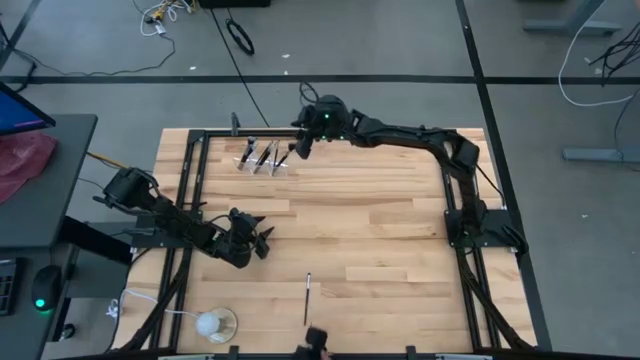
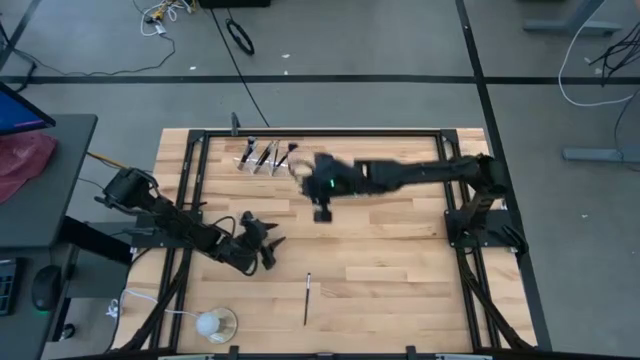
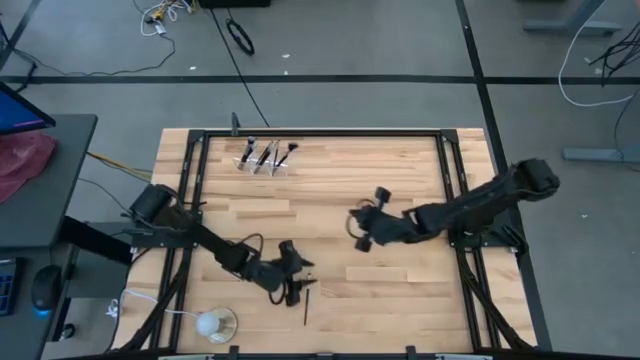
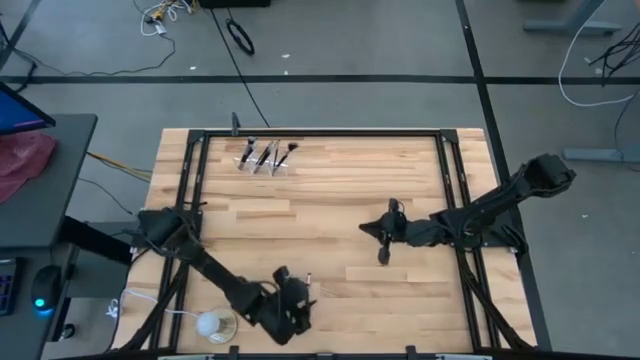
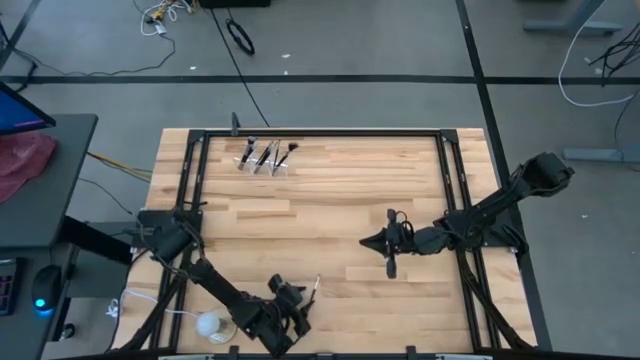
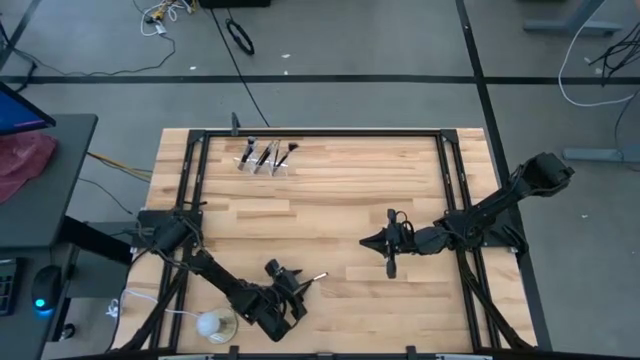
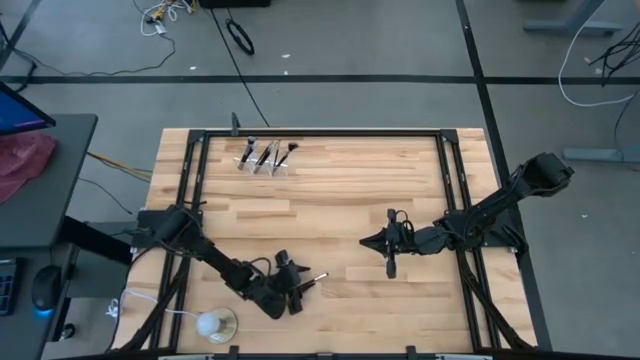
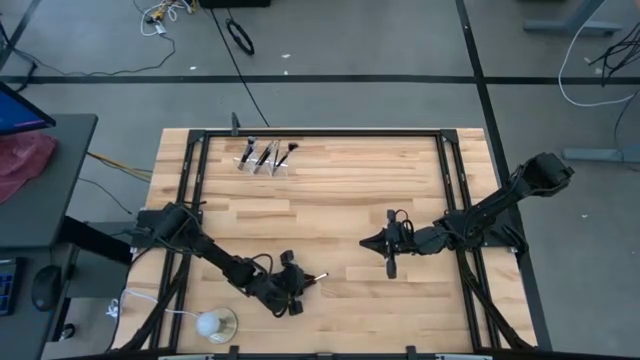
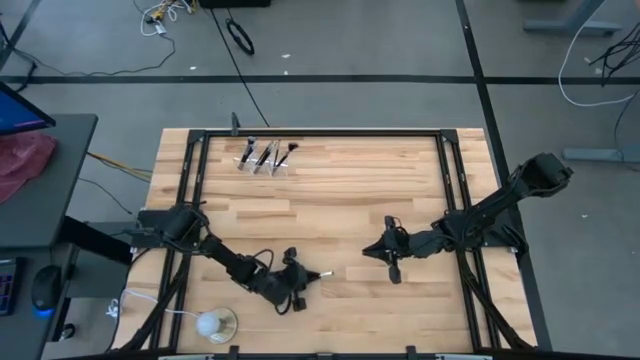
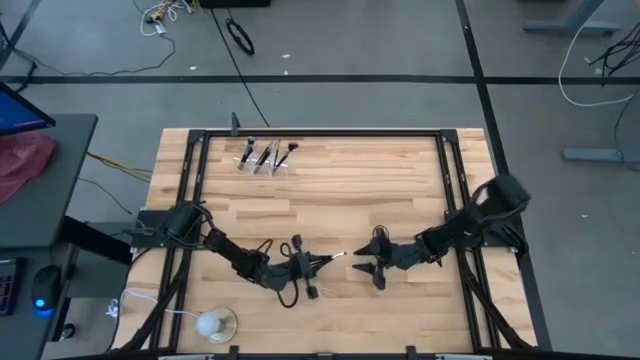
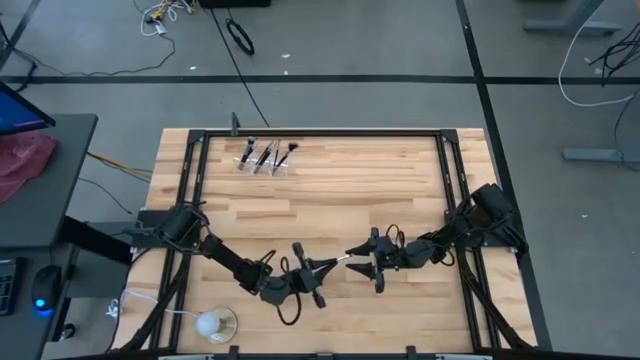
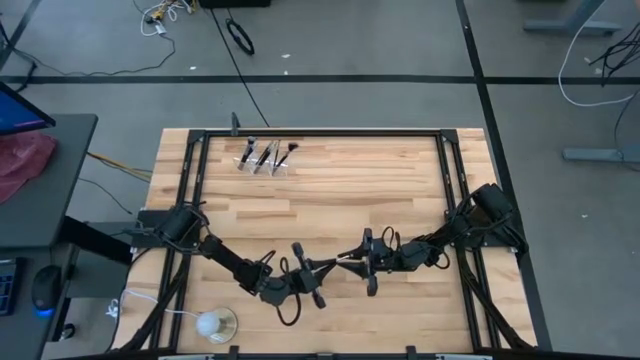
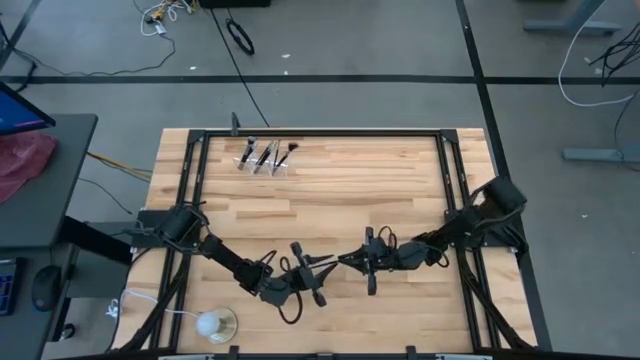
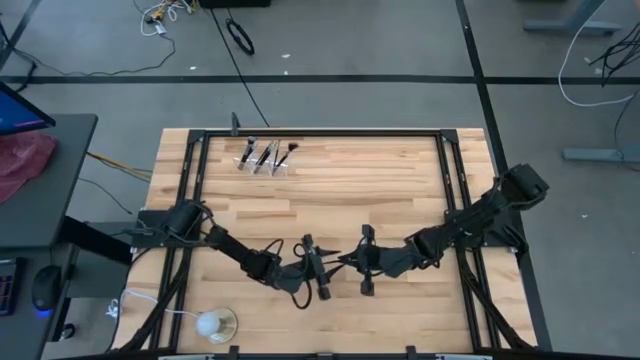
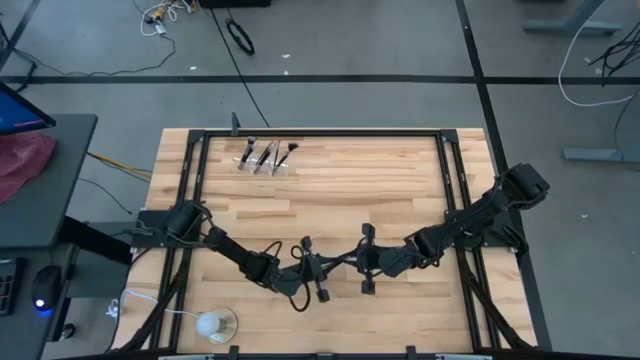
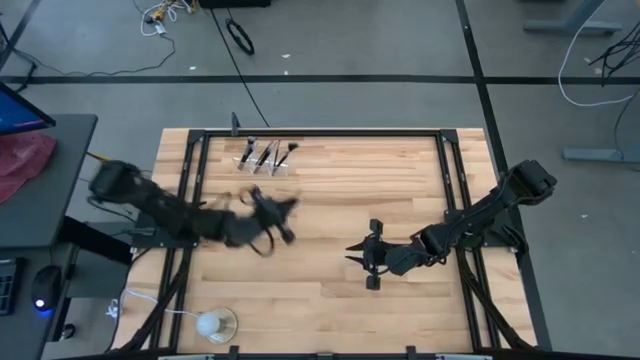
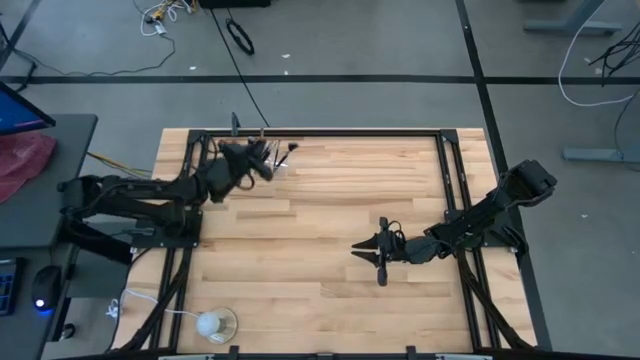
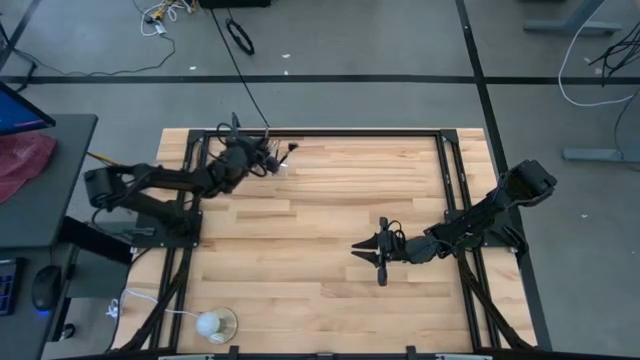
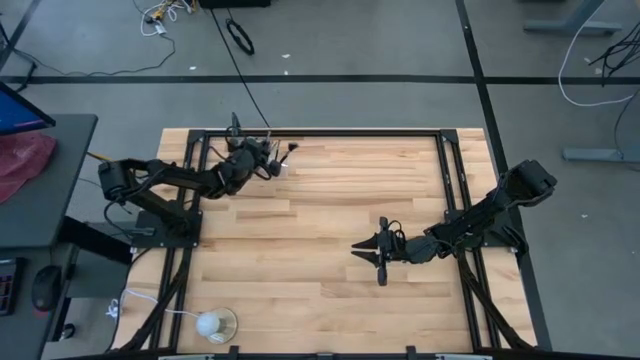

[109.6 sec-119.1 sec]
Task: Put items in baskets/containers
Put the eyeshadow brush into the middle section of the transparent organizer

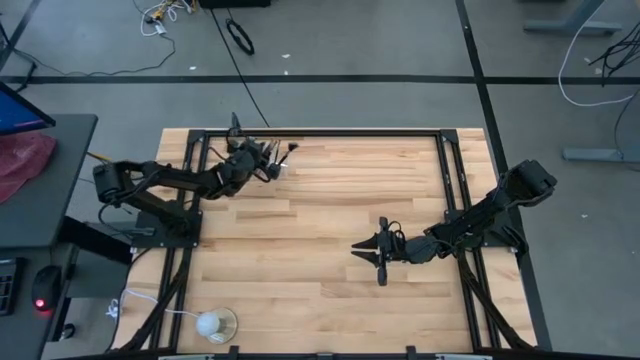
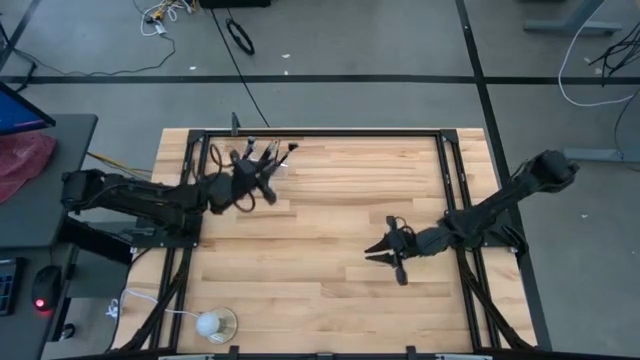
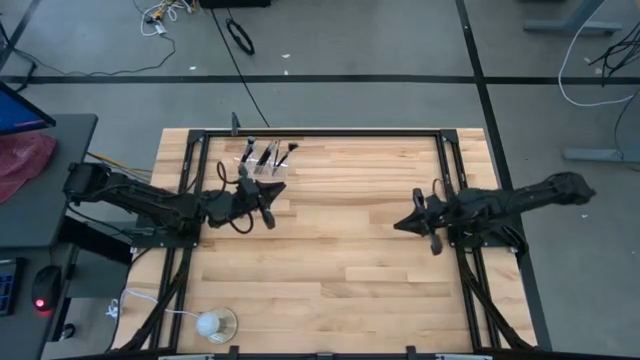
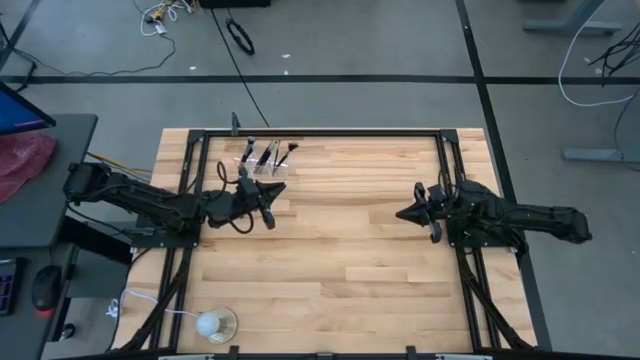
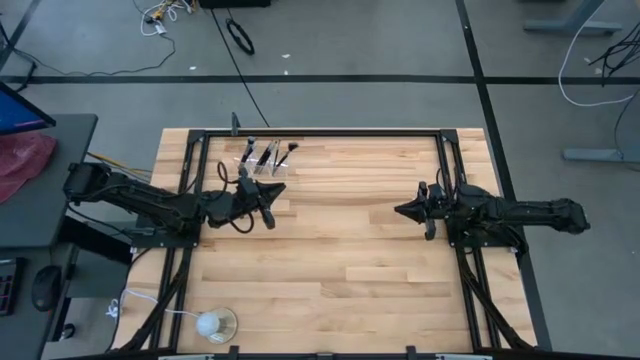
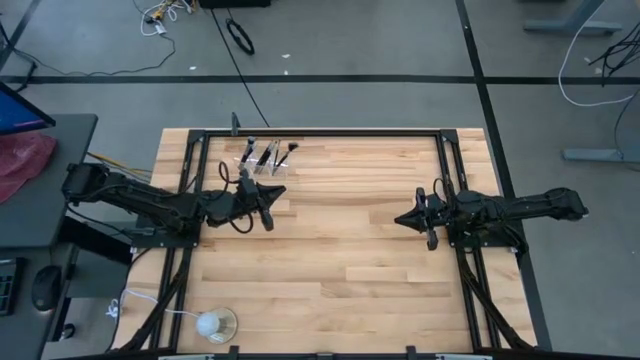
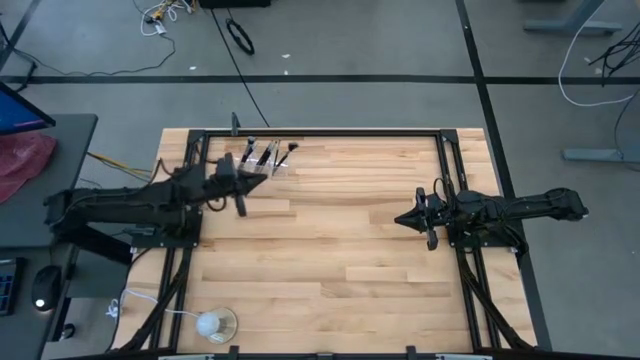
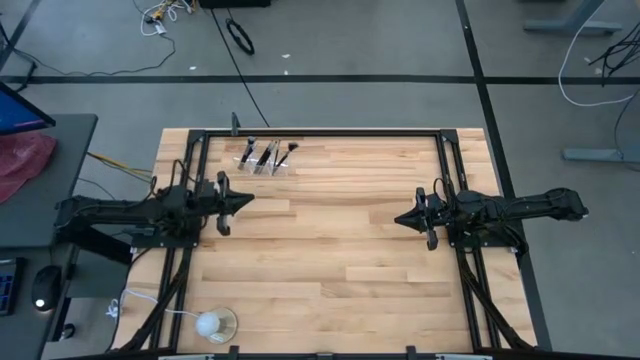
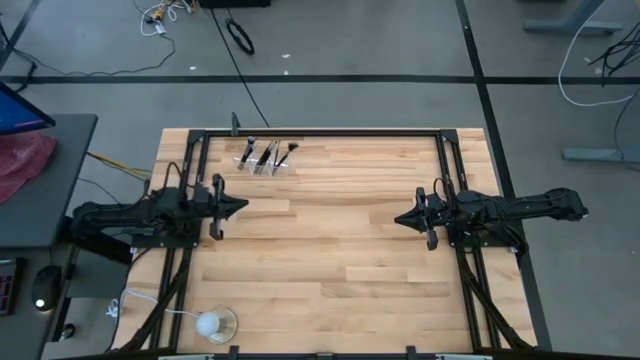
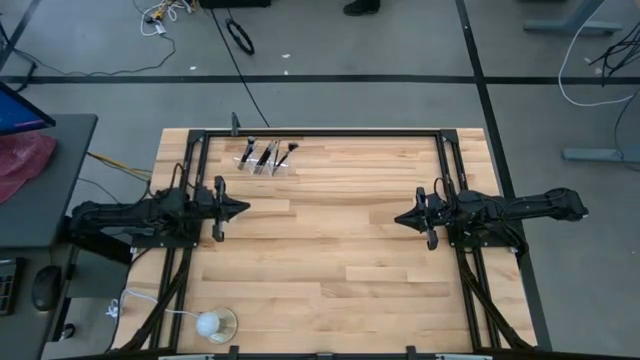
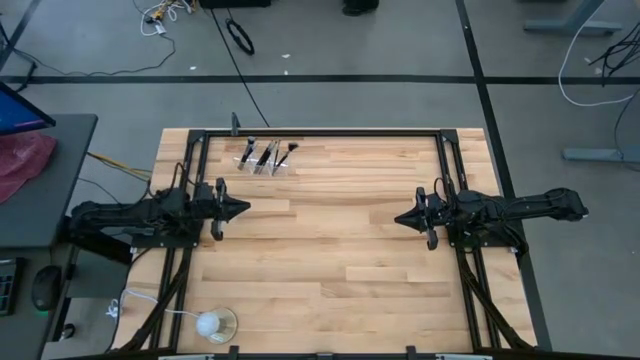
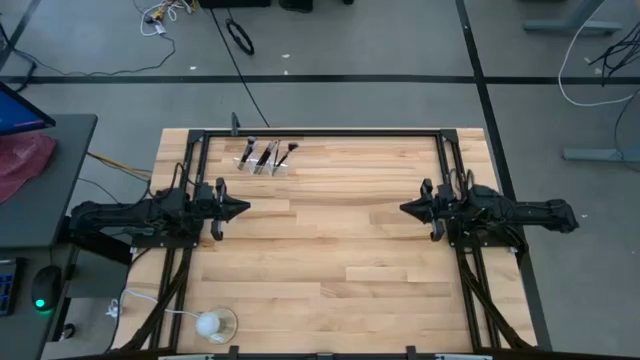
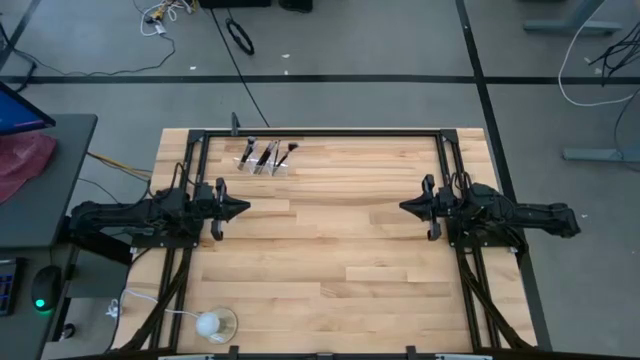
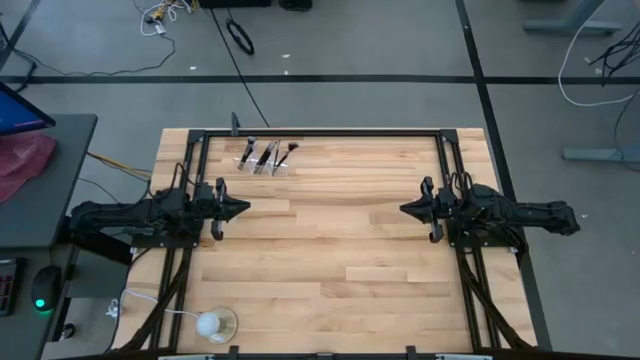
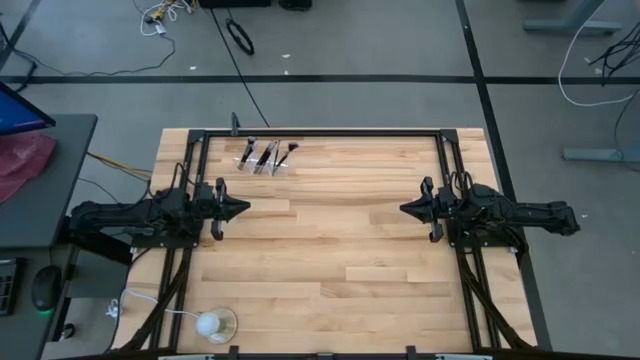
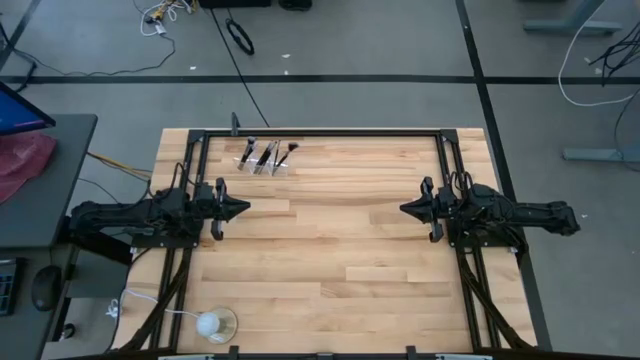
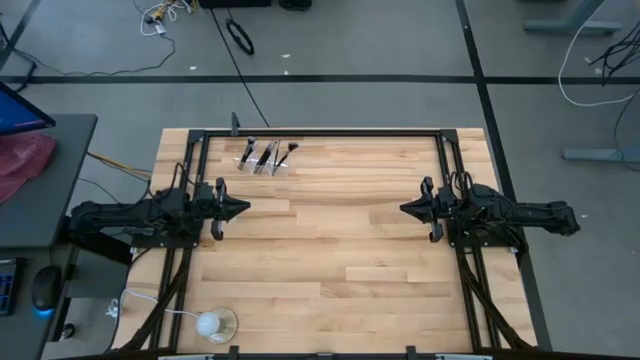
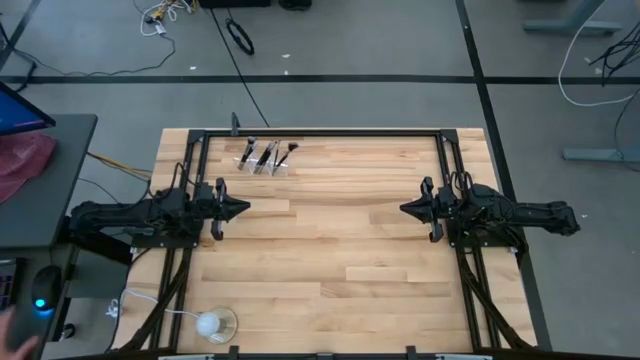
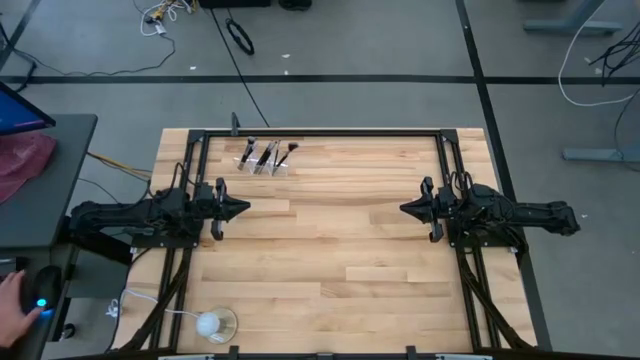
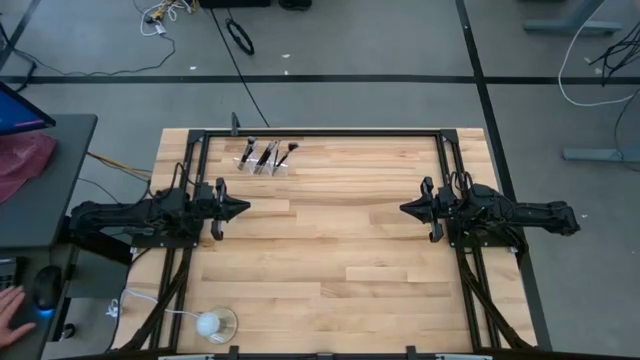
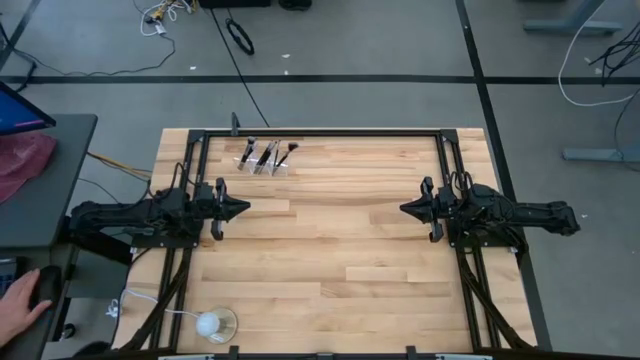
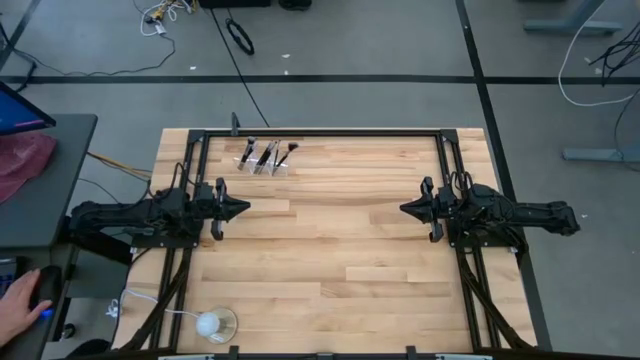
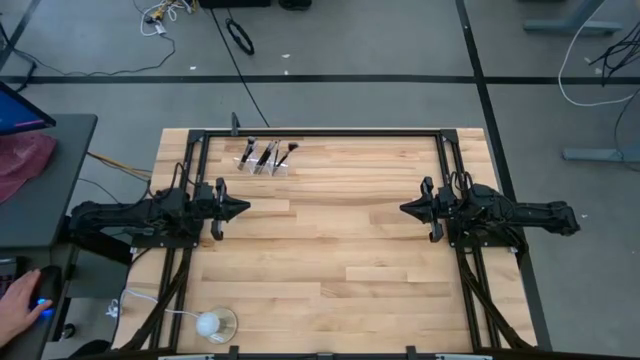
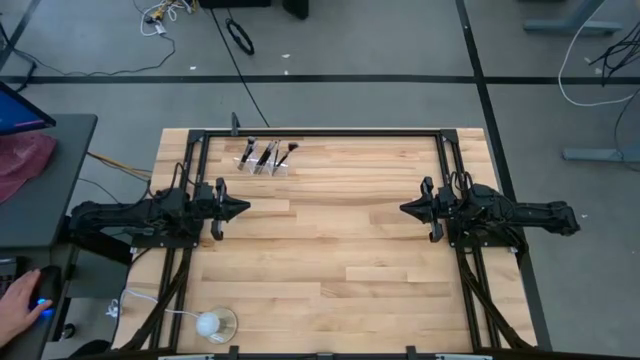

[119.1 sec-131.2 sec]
Return to Home Position

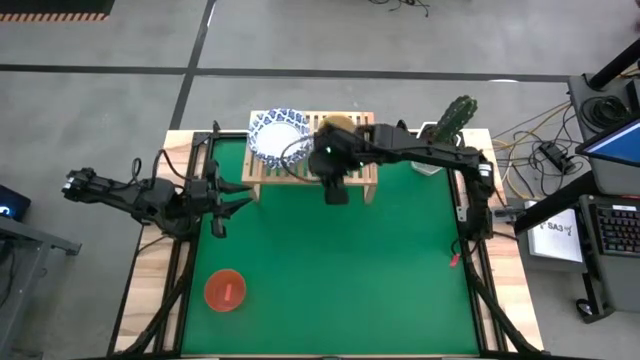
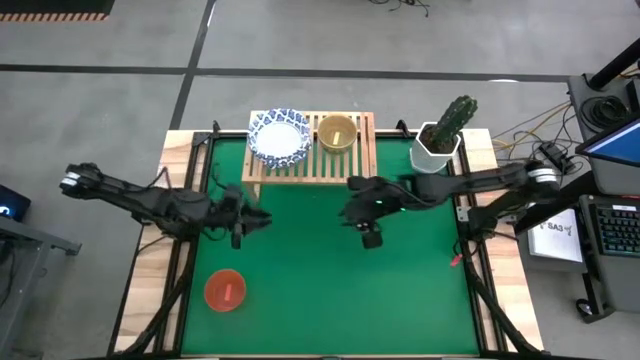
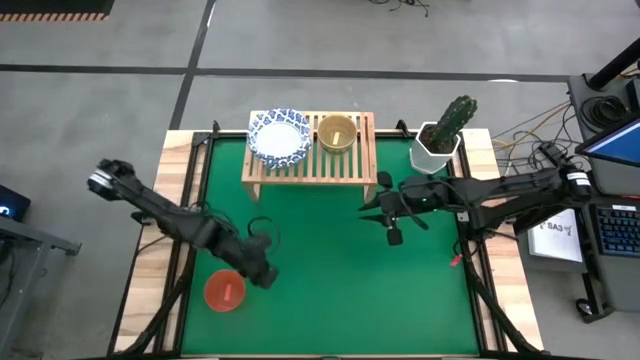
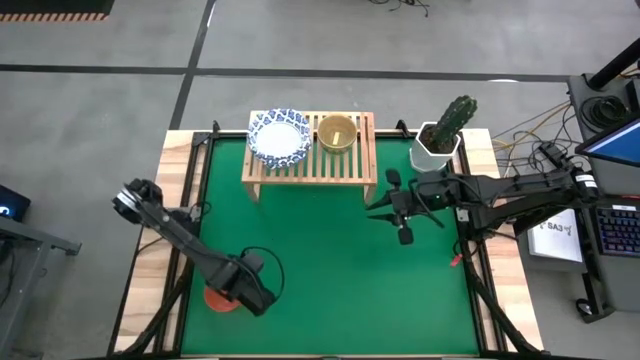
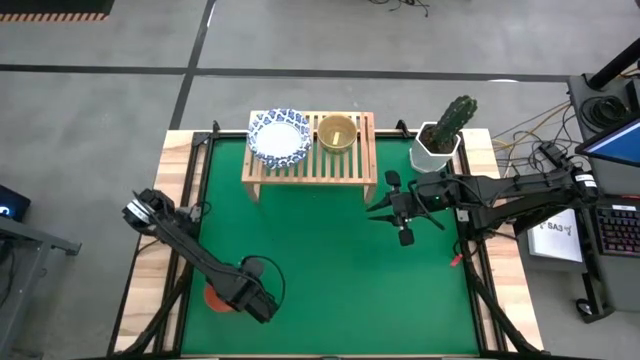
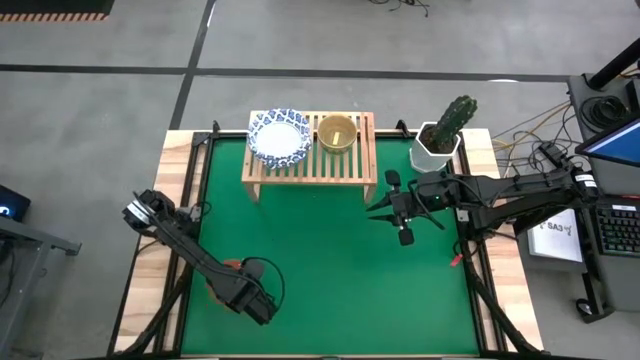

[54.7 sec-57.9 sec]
Task: Place and stack bowls onto a shelf
Stack the orange bowl on top of the yellow bowl on the shelf
